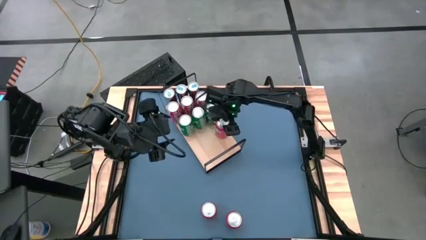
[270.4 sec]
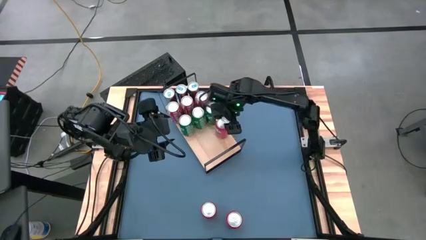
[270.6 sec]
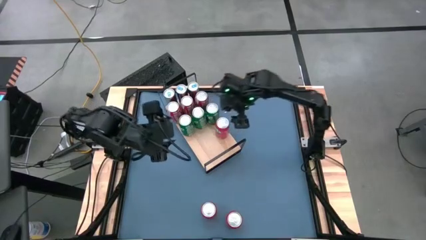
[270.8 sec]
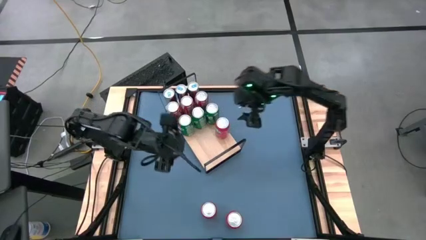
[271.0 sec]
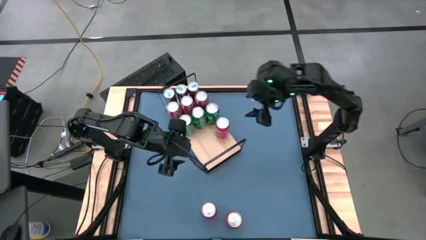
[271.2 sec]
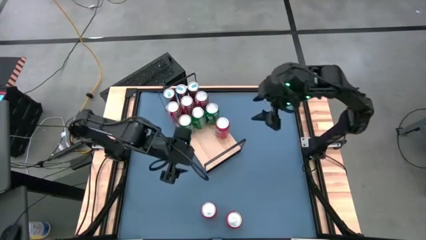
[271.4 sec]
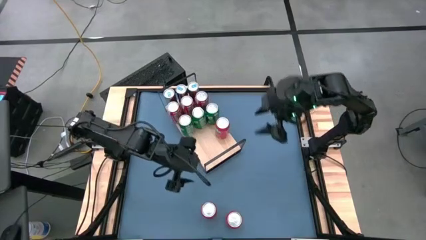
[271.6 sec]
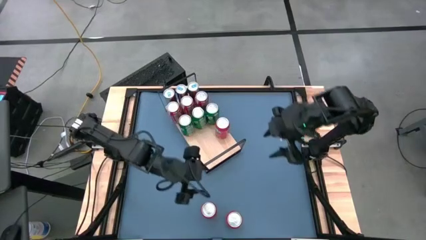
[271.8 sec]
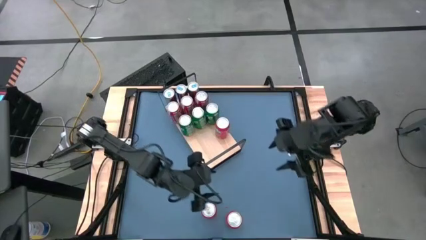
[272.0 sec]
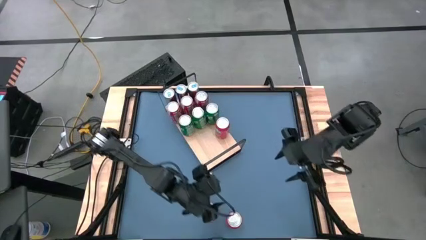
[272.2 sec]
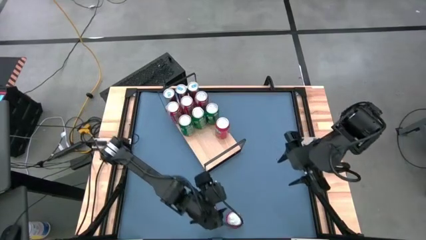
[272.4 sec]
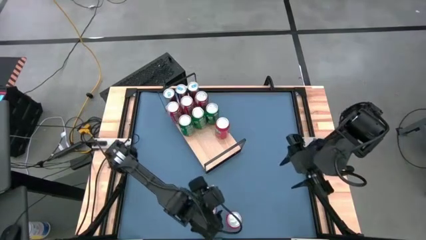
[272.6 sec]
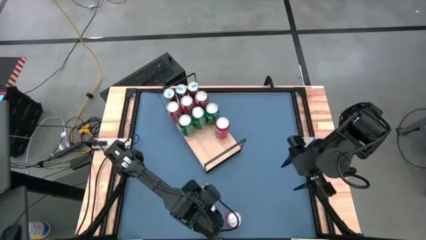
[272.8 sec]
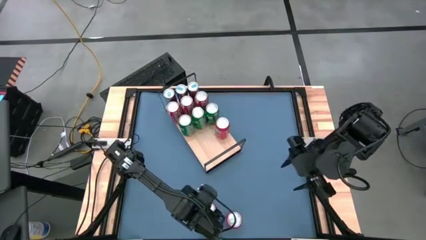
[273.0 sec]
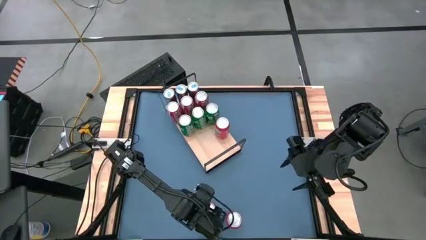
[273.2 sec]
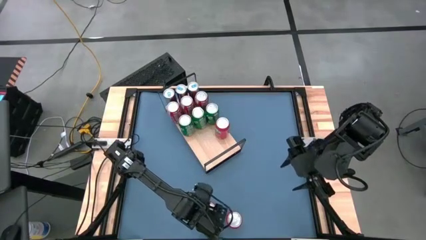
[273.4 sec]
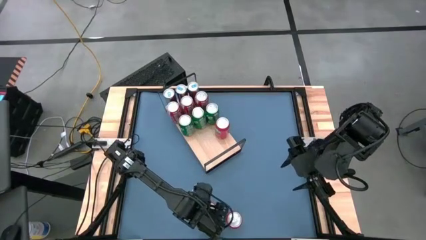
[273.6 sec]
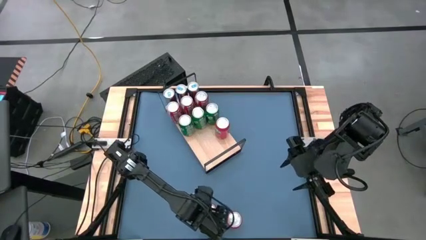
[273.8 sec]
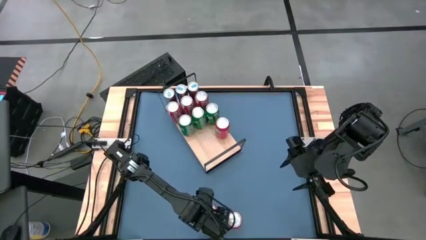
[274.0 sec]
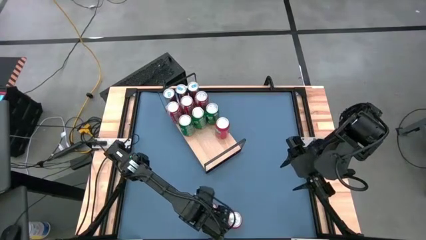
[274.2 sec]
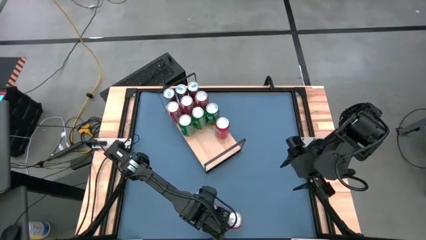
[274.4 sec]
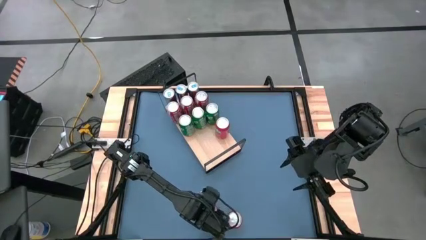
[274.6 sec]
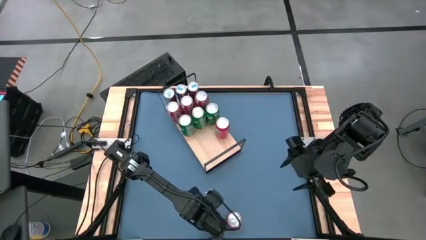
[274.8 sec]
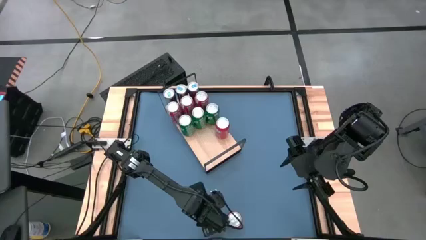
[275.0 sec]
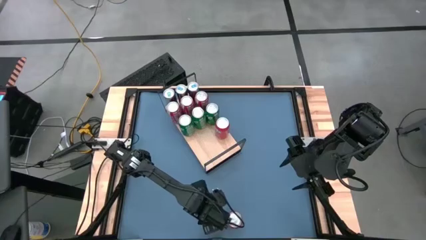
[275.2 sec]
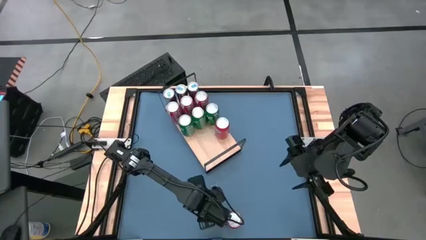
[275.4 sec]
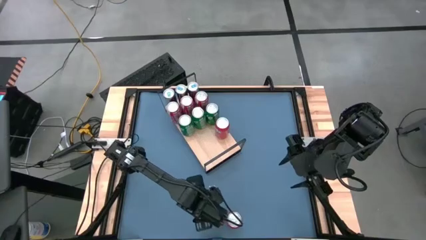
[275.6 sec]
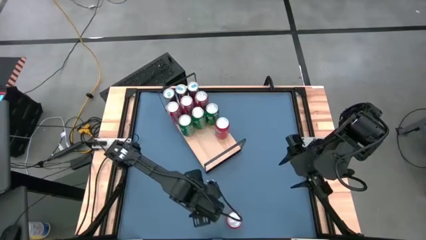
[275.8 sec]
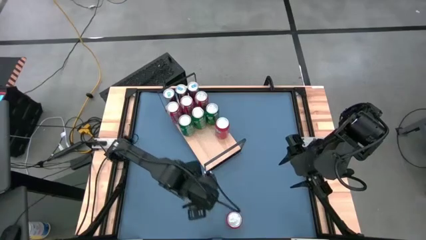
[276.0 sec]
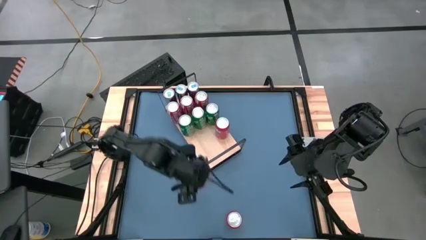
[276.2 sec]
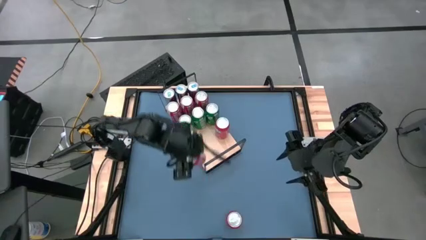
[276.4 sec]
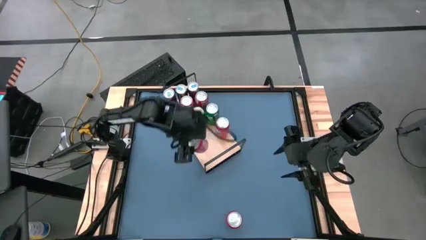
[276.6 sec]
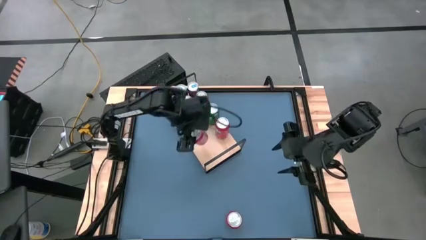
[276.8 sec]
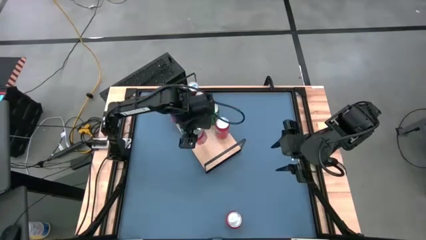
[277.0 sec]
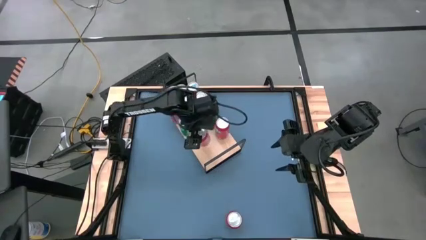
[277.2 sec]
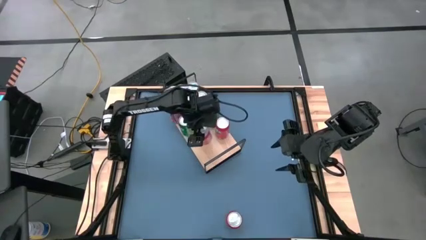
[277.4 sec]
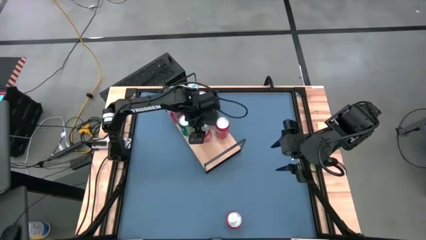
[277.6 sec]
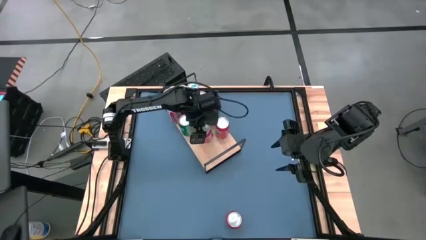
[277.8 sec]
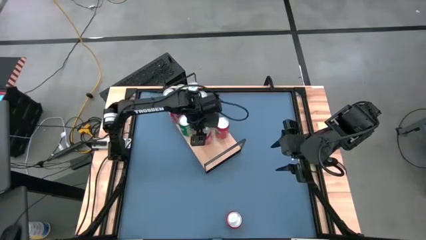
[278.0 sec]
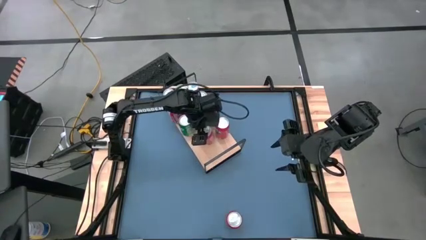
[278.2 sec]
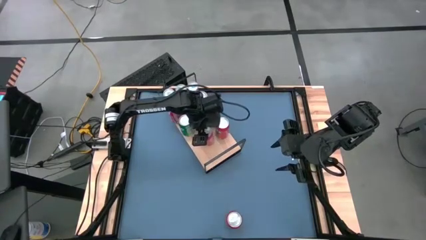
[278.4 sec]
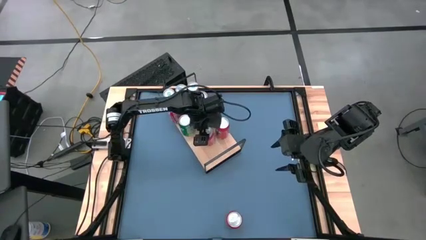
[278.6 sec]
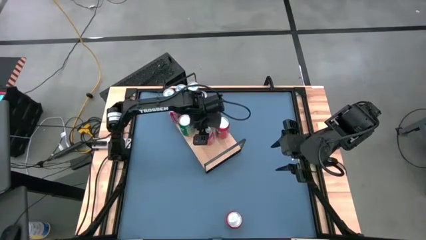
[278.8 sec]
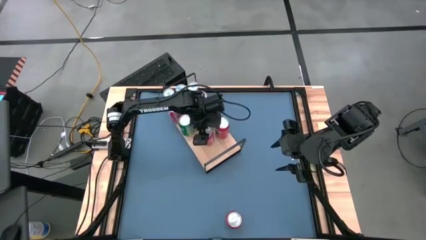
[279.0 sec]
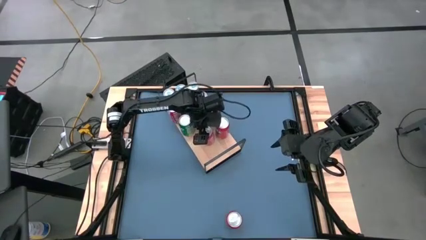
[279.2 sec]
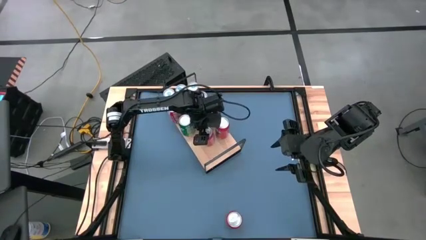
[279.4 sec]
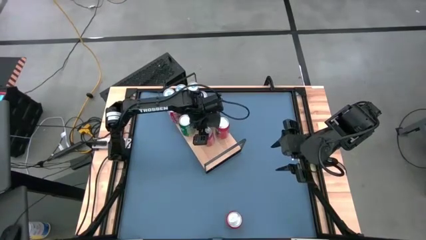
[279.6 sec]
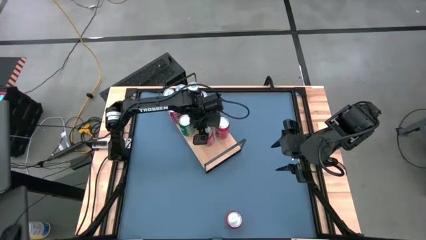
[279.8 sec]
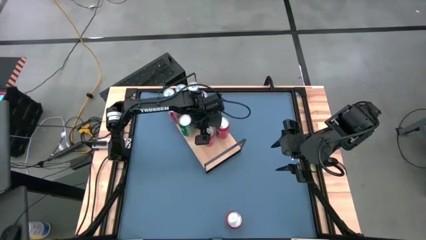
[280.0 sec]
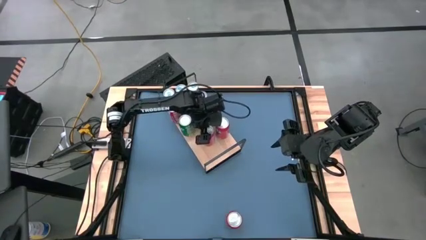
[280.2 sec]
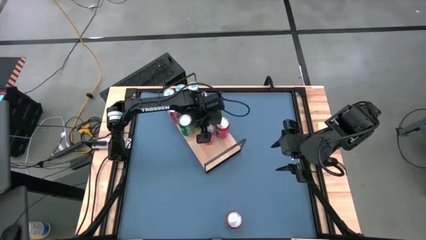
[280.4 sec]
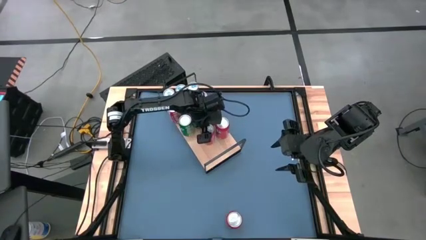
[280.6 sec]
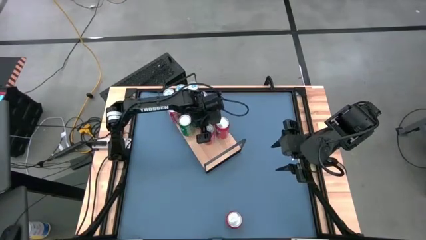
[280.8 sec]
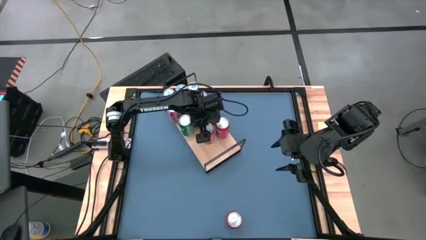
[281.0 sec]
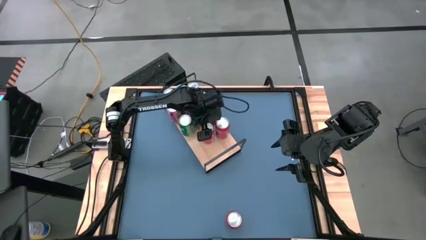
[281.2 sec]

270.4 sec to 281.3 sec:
Task: Place canned beverage on shelf
Put the left red soda can on the shelf aligned with the other red soda can

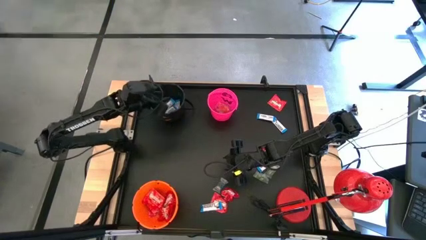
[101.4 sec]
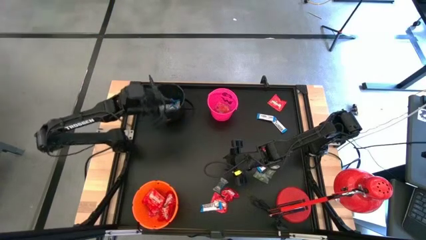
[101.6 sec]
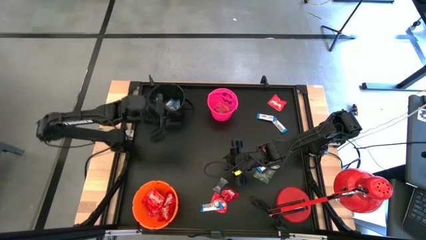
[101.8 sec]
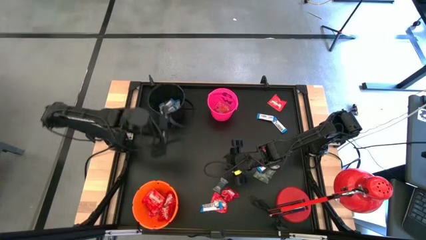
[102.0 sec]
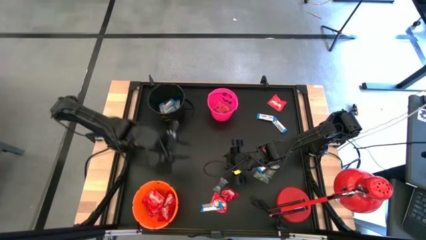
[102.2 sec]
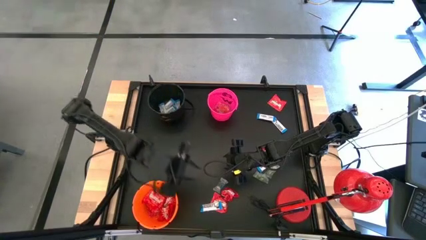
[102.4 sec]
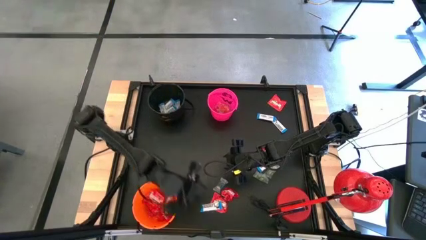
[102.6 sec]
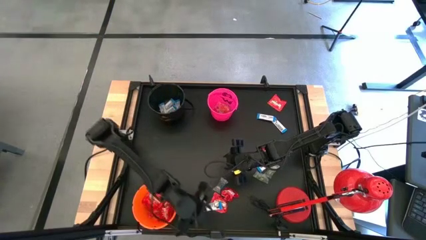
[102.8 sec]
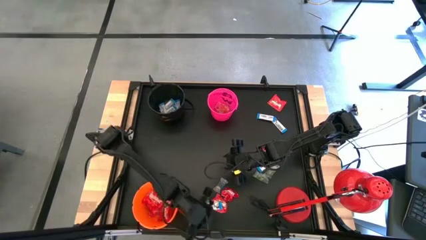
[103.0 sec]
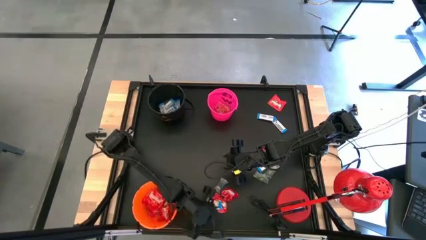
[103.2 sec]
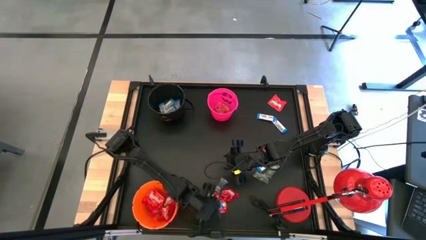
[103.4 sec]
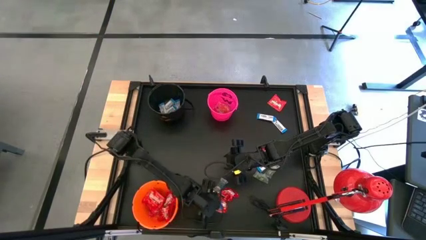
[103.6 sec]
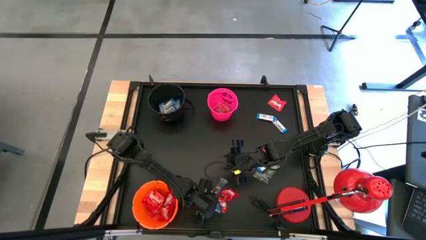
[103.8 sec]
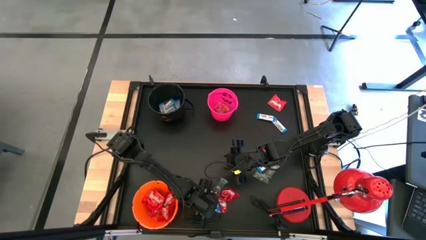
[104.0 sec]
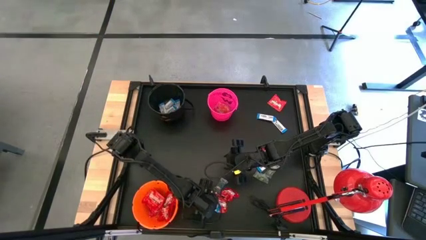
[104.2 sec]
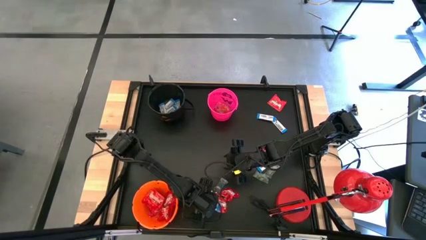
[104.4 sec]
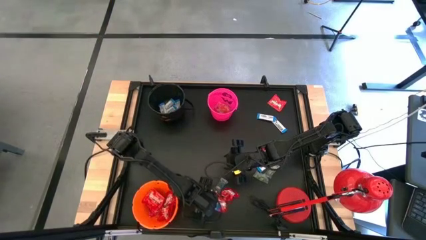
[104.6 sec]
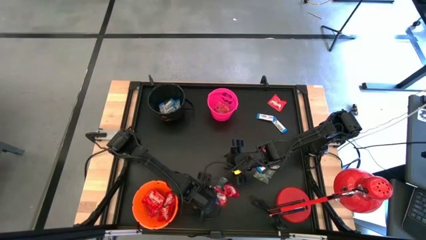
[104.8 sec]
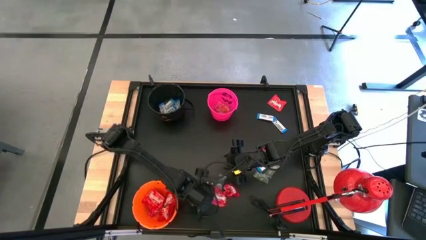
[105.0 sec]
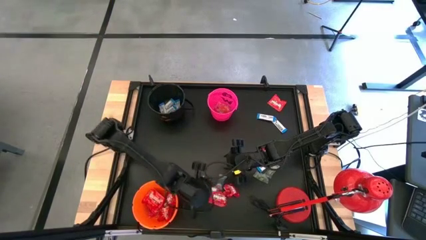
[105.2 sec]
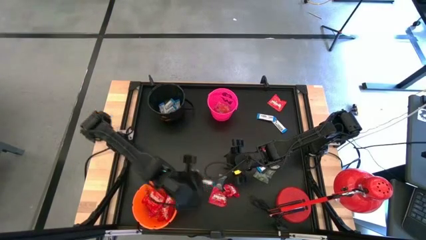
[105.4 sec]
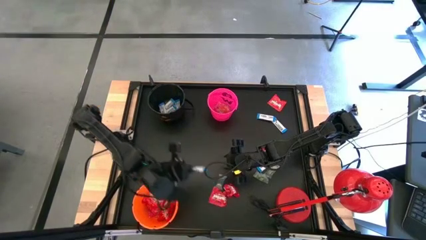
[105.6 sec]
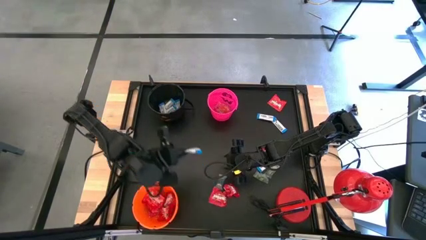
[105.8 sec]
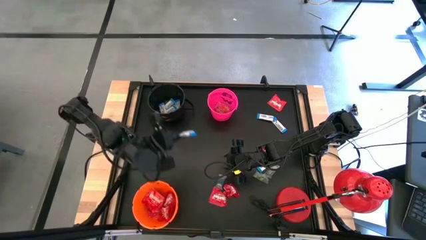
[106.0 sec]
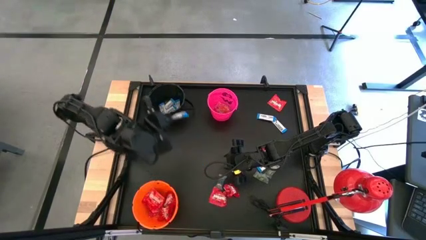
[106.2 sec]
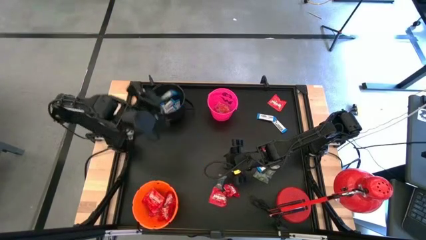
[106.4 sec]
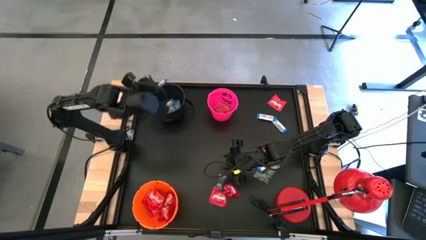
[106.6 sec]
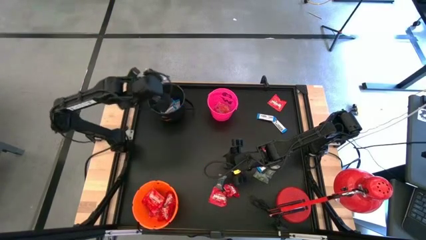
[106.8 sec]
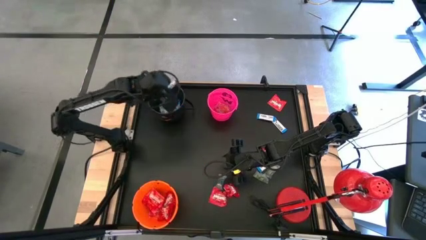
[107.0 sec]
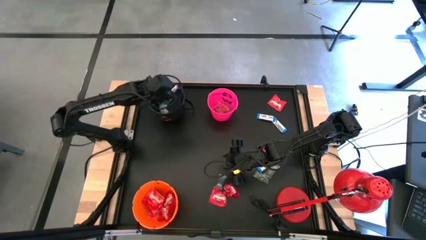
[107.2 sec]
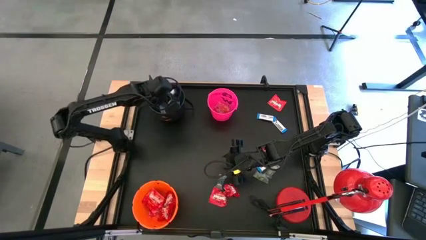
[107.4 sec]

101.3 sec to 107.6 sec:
Task: Organize candy in baskets
Put the white chocolate bar into the black bucket
